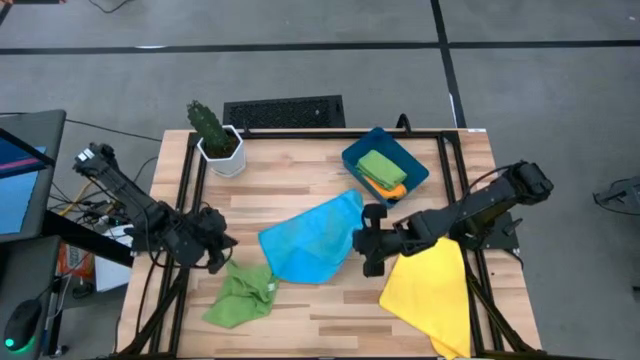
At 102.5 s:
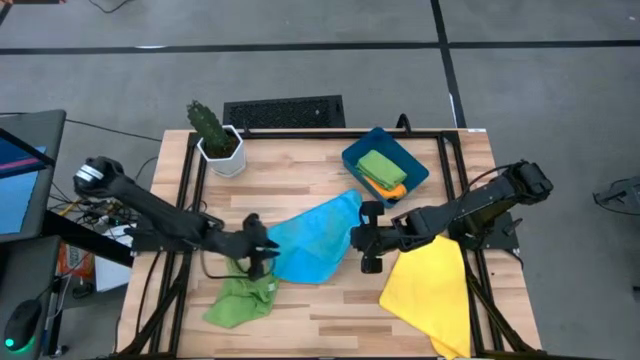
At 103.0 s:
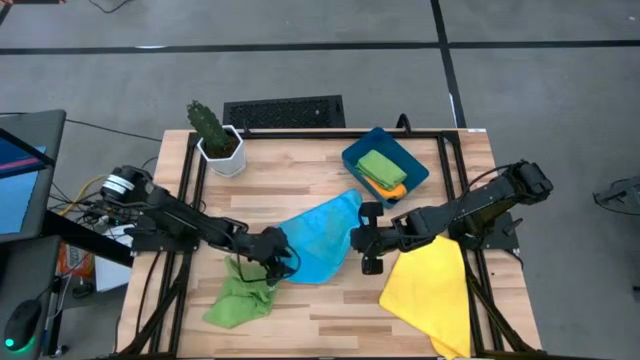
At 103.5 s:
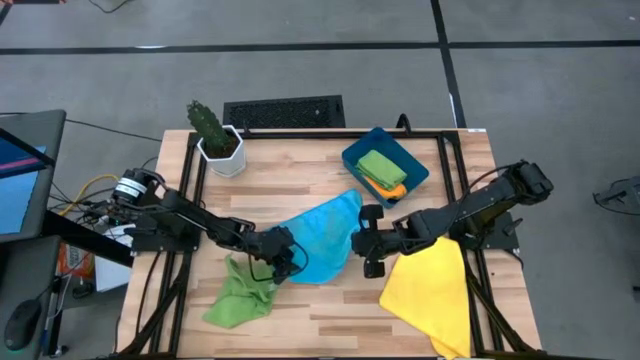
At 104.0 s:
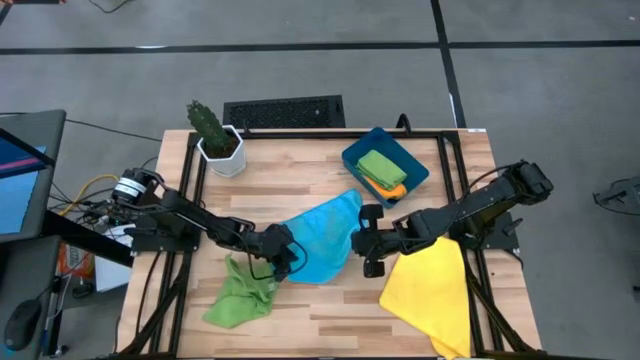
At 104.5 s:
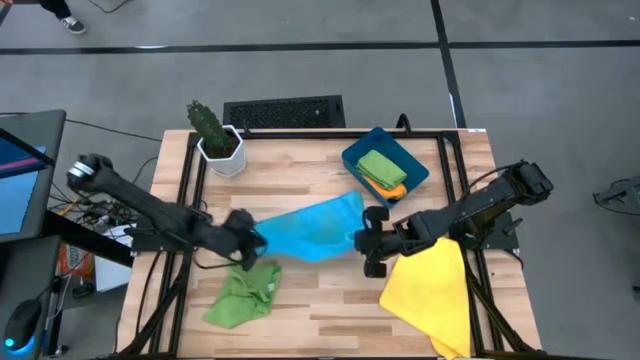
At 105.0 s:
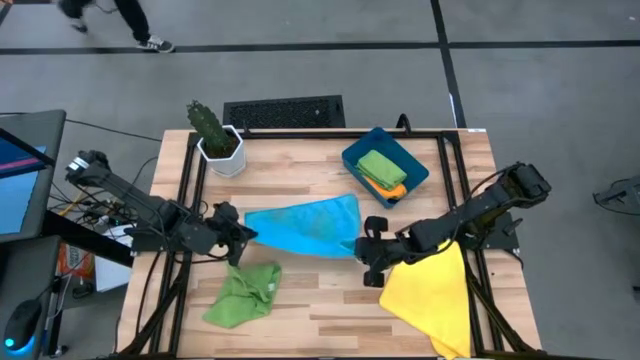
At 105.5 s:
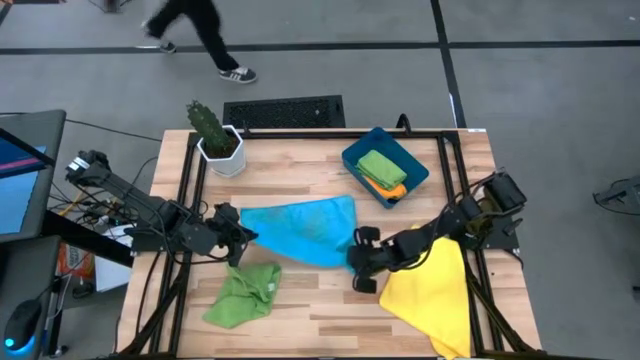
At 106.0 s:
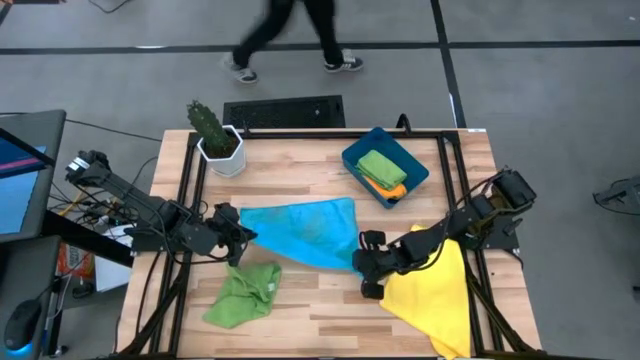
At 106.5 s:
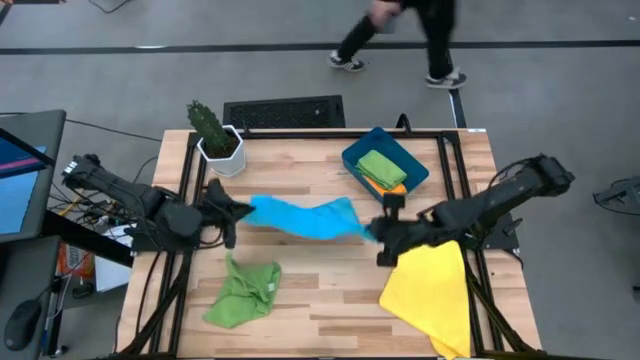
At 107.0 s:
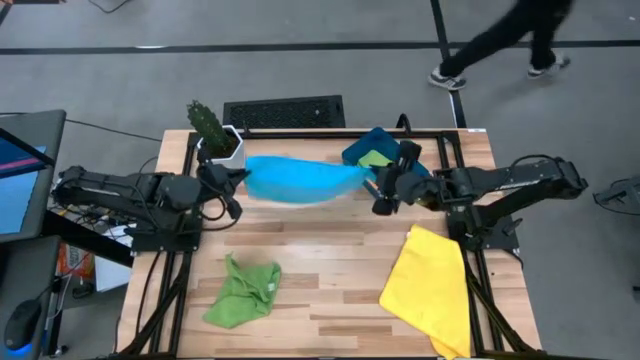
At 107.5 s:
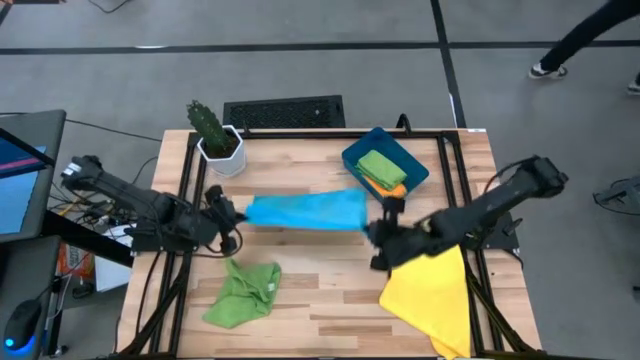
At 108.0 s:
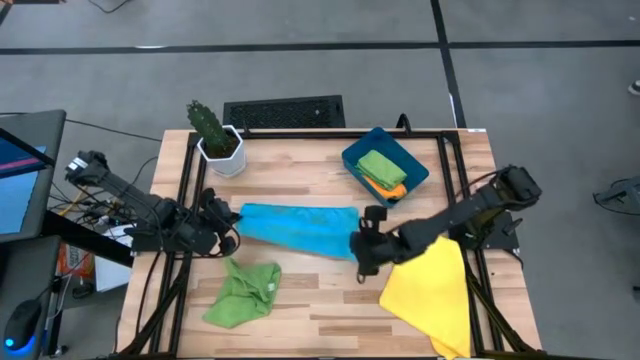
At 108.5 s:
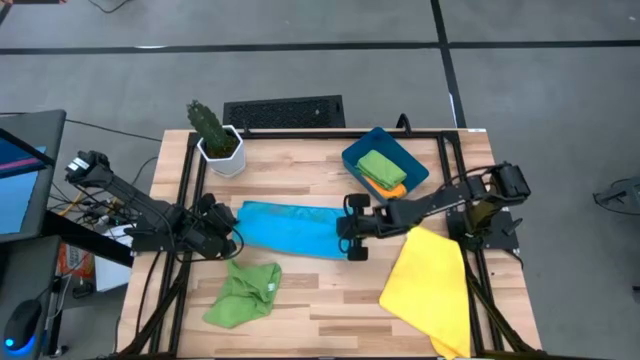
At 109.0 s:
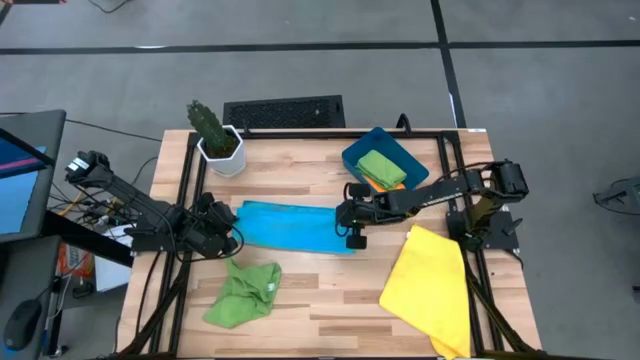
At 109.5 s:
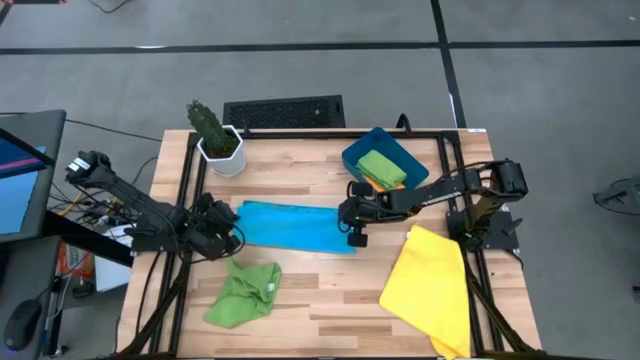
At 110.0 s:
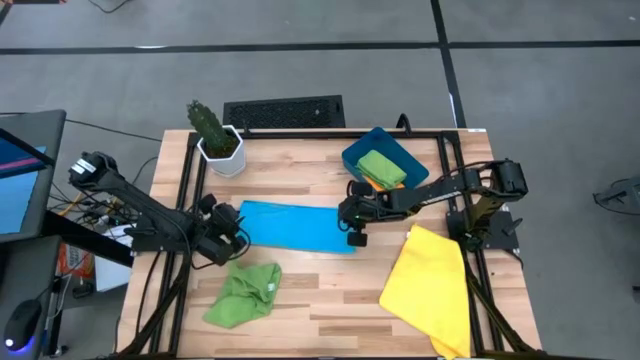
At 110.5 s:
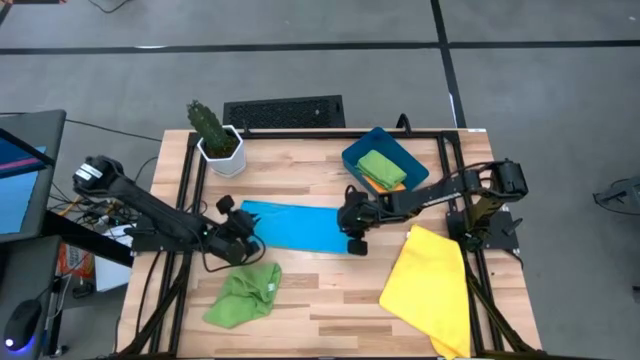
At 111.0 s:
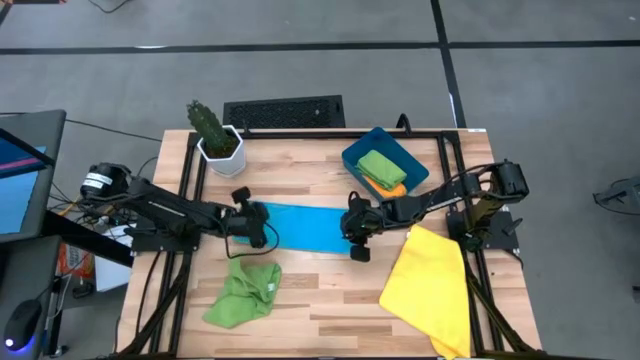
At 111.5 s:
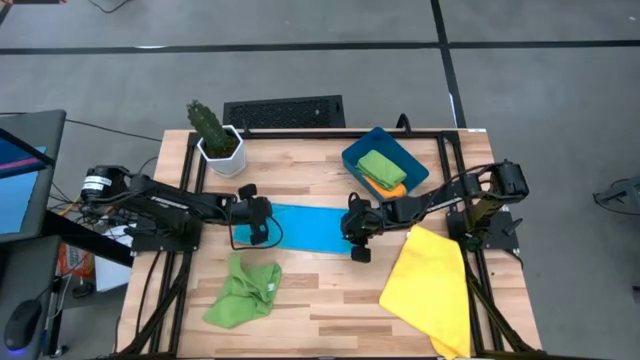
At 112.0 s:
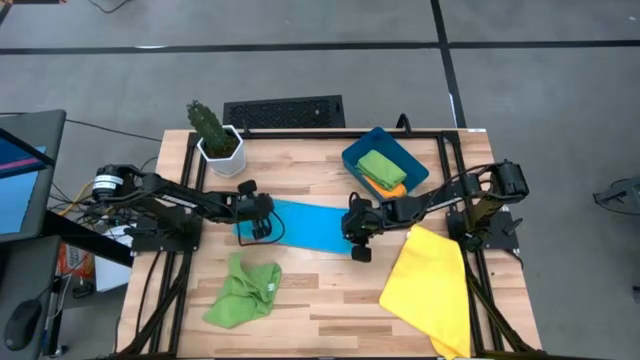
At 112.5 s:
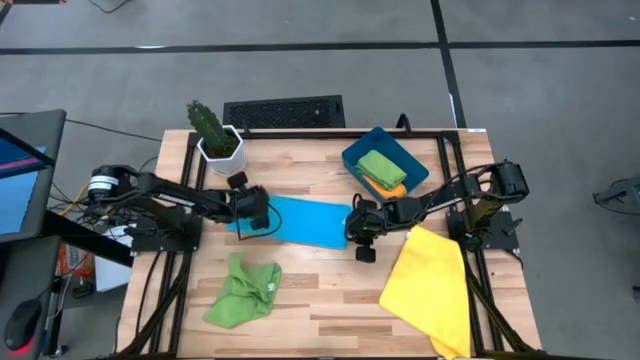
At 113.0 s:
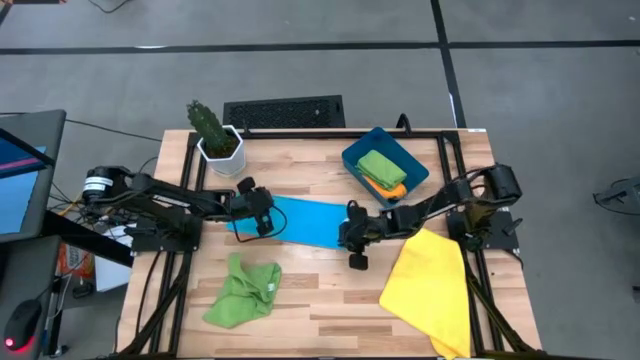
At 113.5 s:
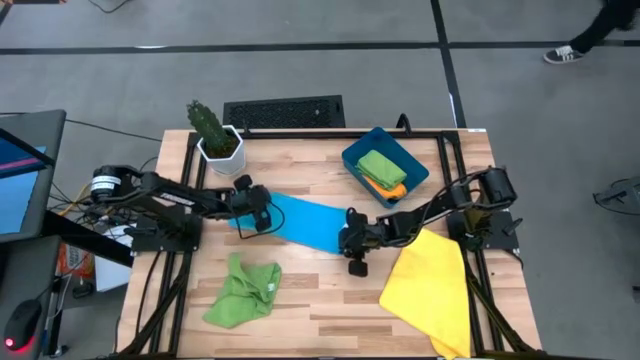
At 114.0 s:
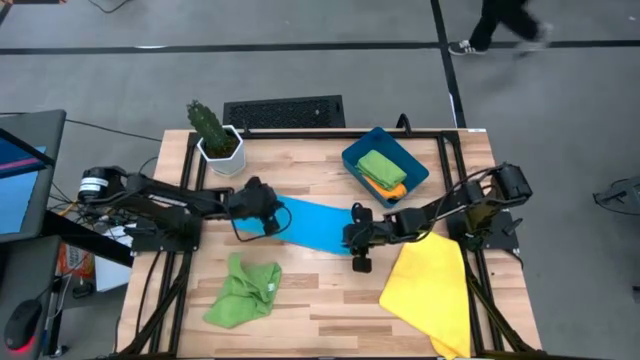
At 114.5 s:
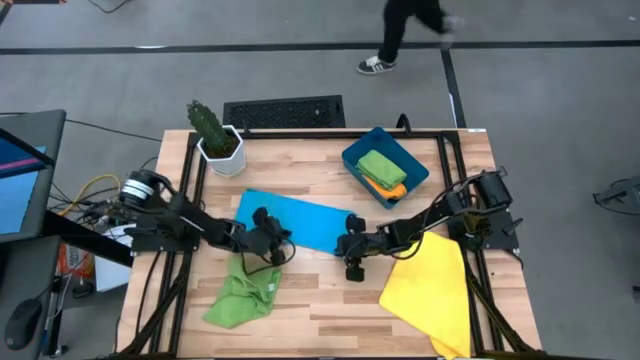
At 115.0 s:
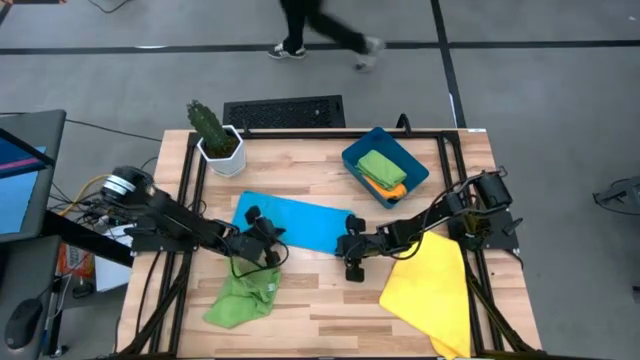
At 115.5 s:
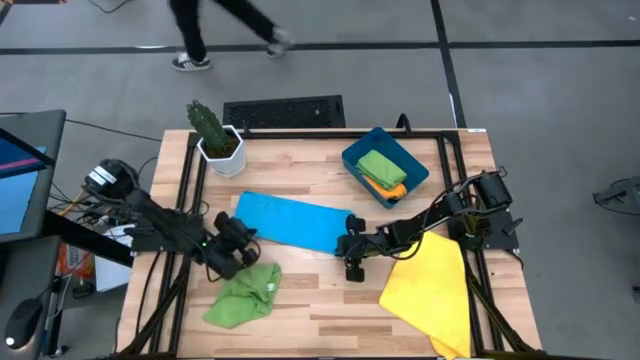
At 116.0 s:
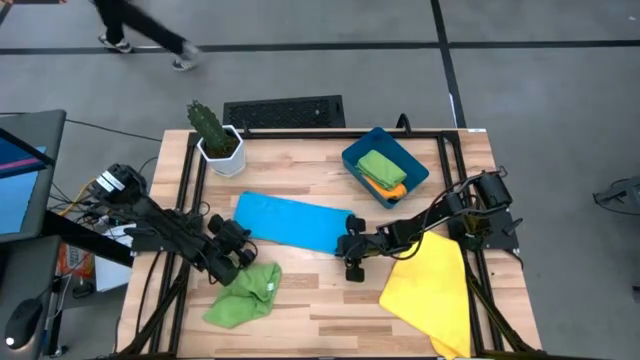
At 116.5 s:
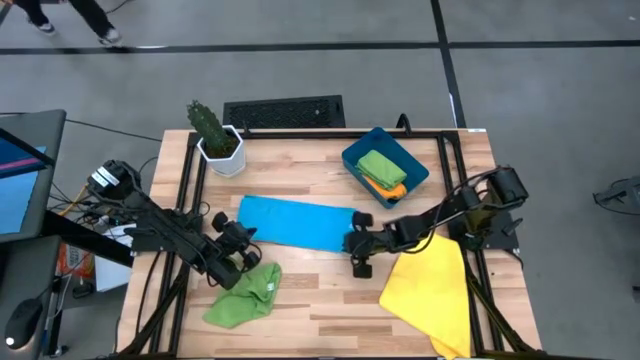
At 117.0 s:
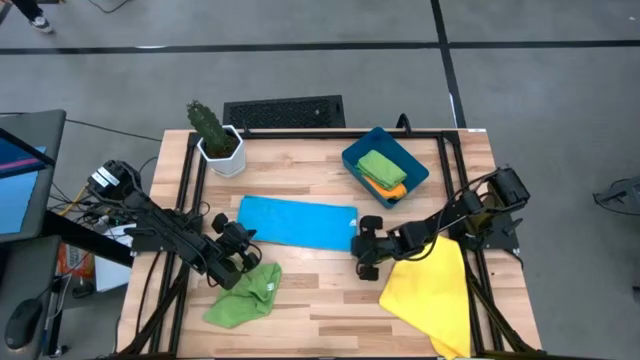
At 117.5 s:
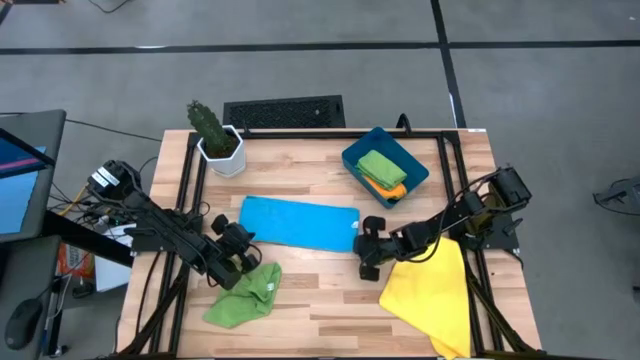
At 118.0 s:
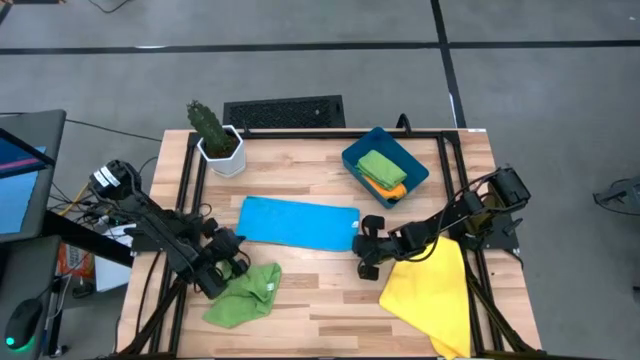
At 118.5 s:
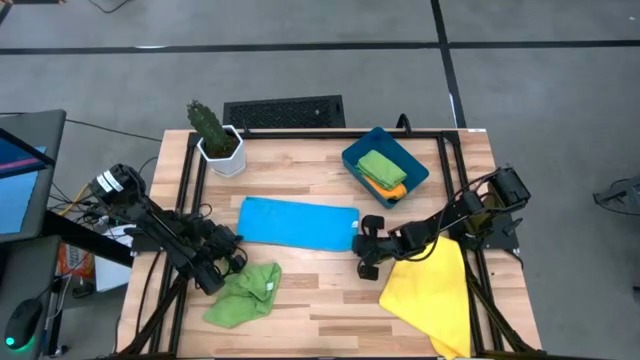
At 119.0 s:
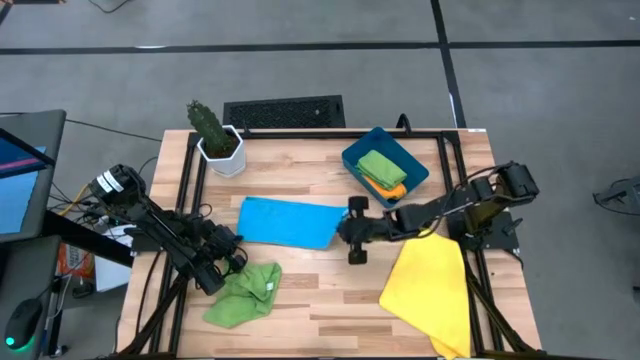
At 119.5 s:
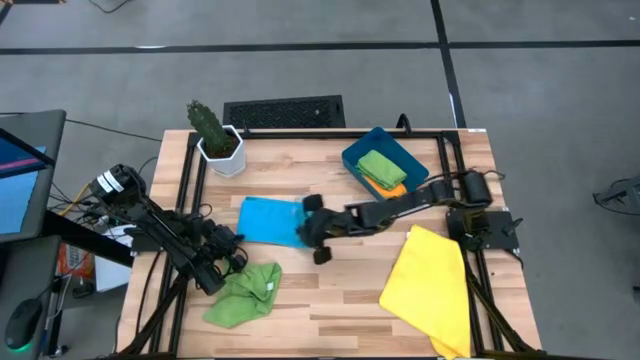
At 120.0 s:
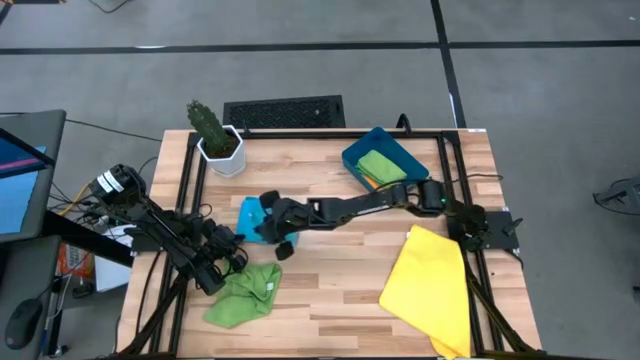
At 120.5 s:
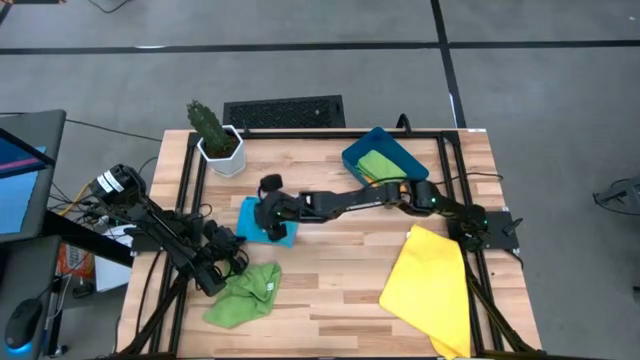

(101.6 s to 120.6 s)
Task: Fold microfiber towels
Fold the blue microfiber towel

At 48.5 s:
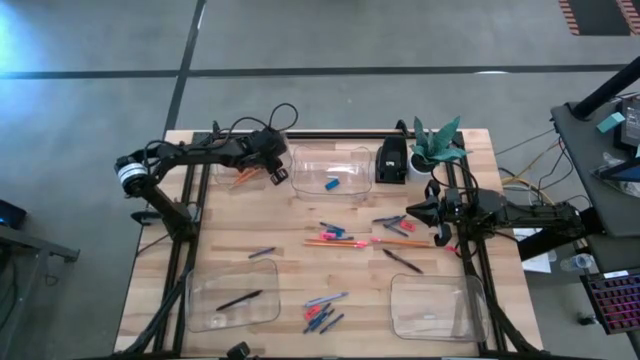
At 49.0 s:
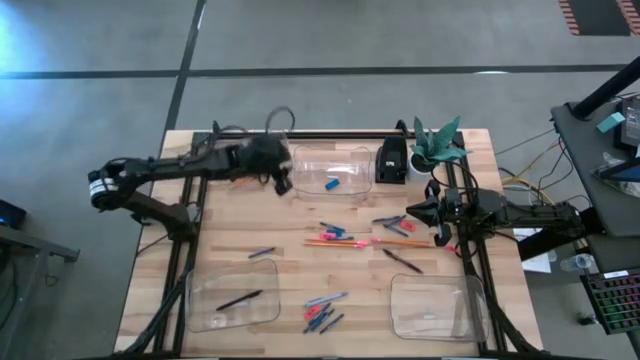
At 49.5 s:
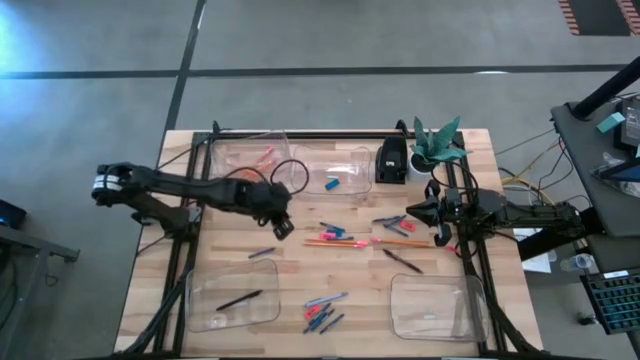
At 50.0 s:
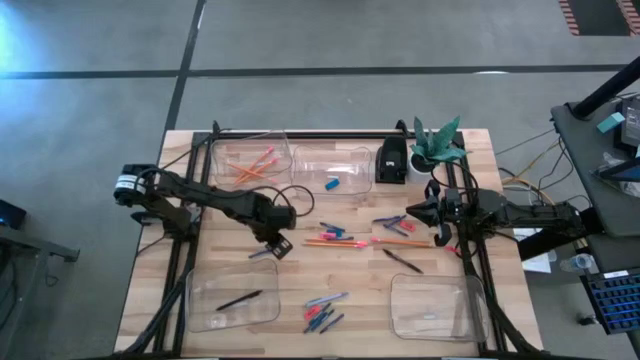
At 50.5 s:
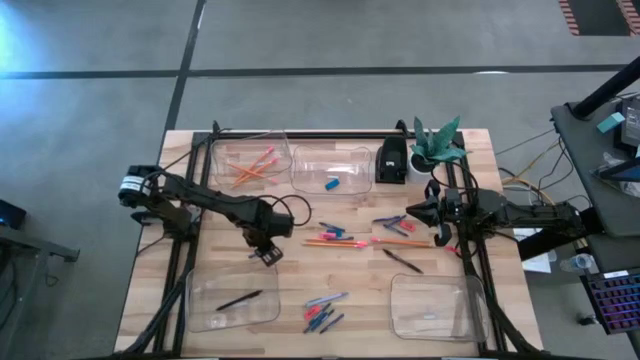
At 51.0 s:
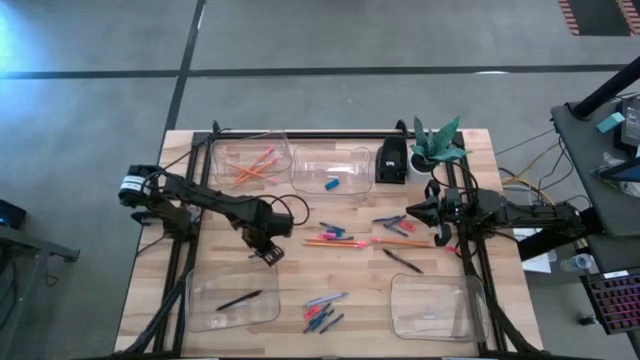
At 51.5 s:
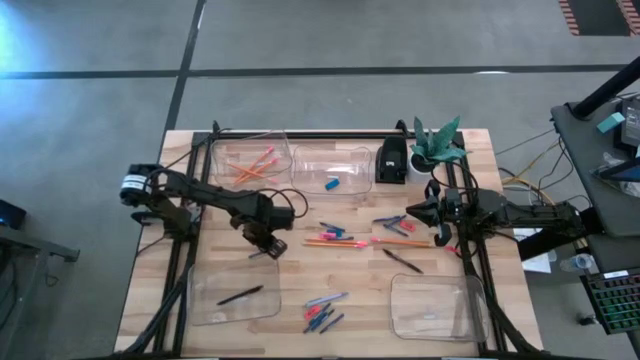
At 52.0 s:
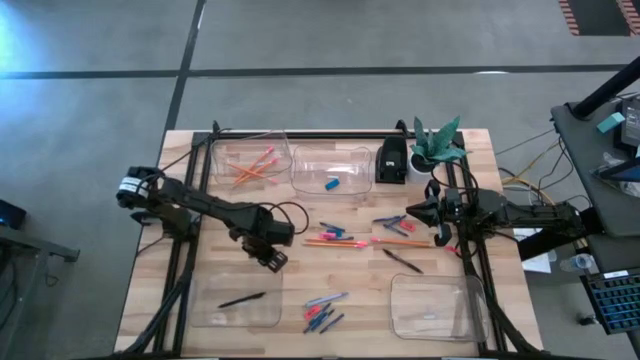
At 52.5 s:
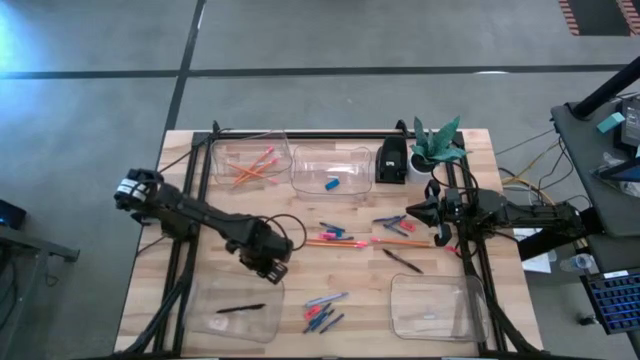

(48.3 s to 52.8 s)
Task: Sort crayons/erasers/pens/pencils in bins
Adjust the bottom right transparent bin
